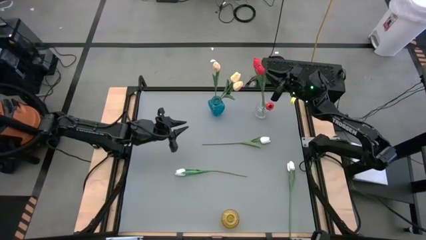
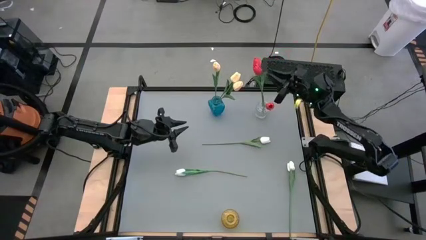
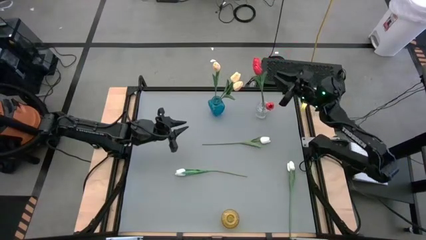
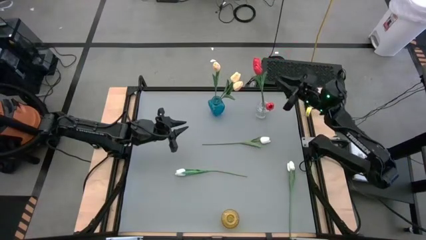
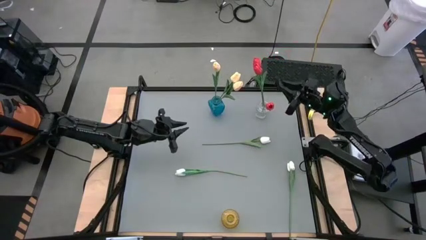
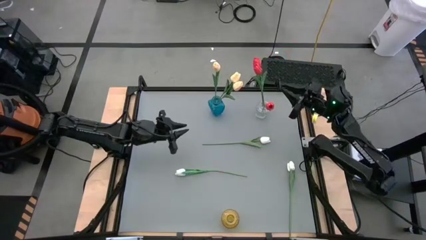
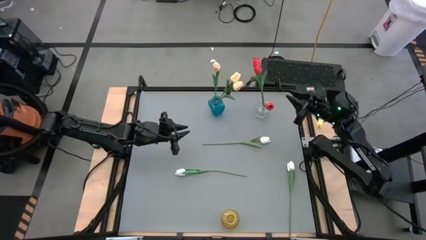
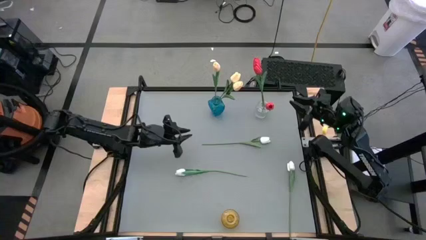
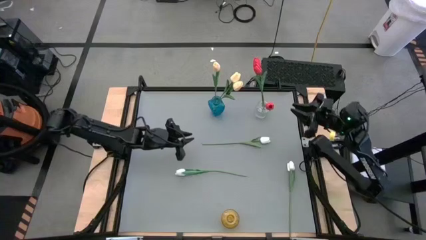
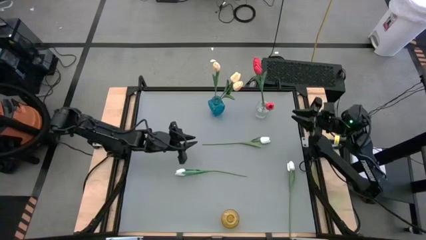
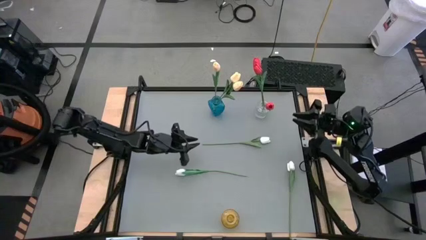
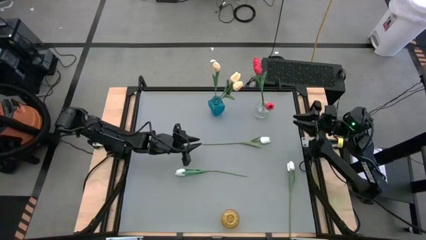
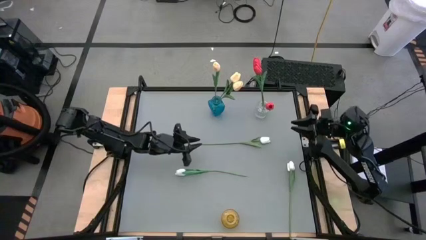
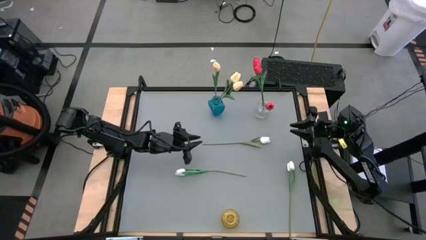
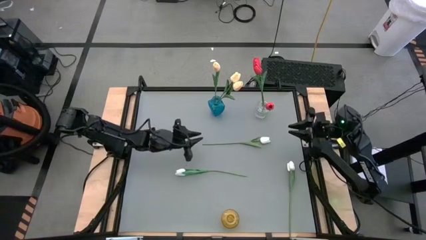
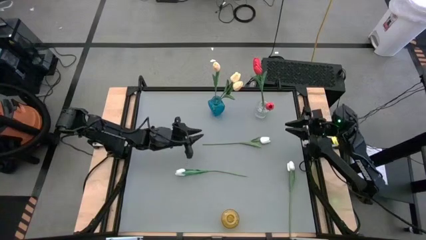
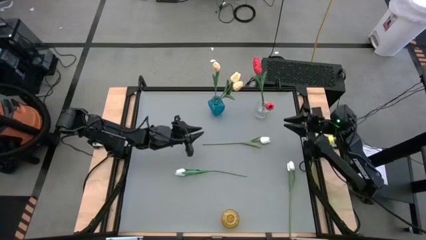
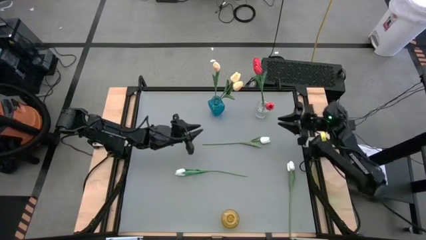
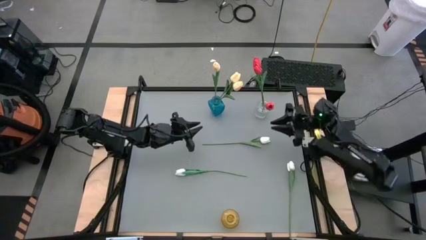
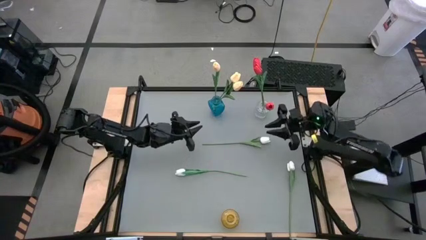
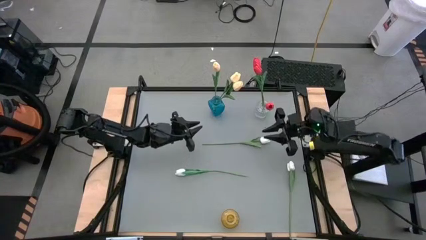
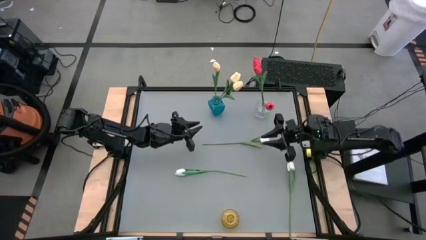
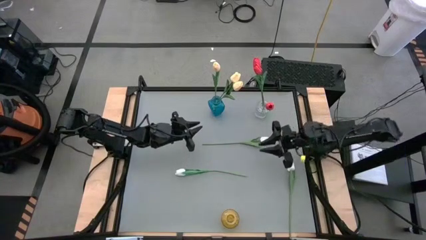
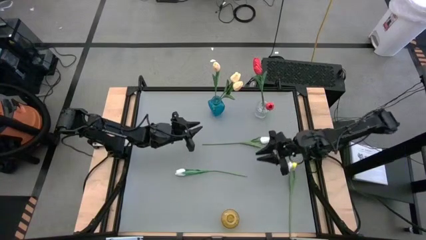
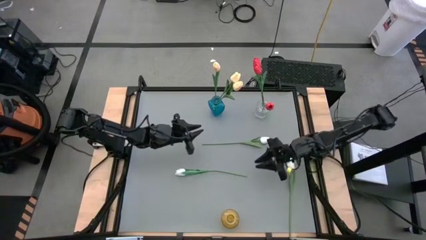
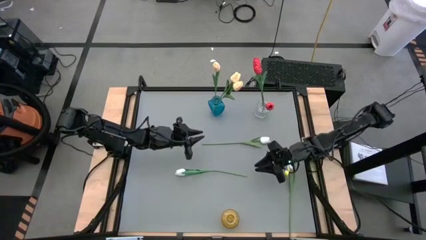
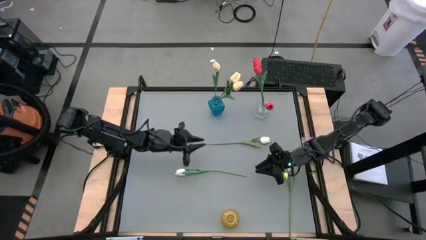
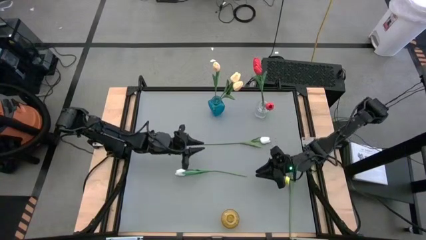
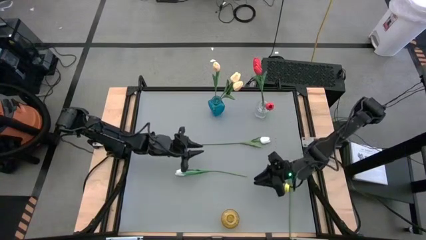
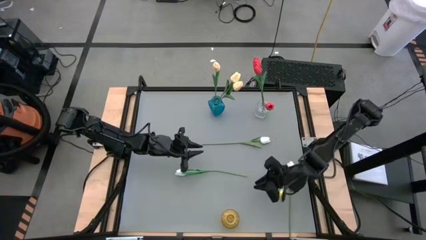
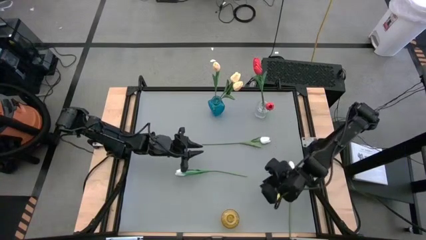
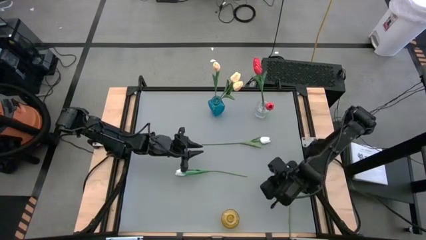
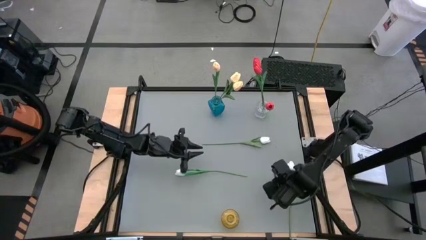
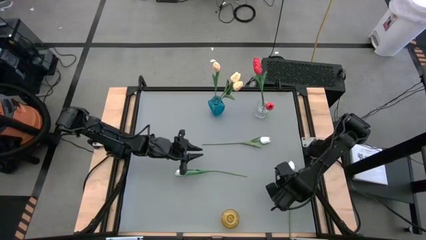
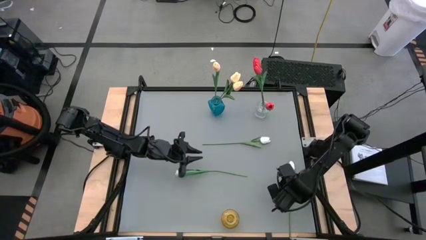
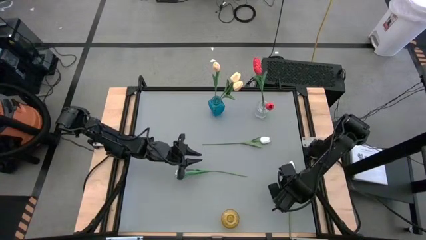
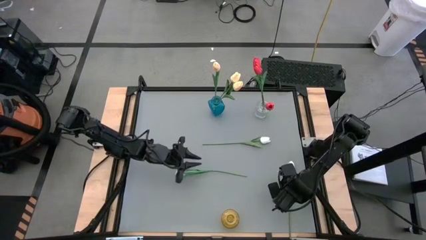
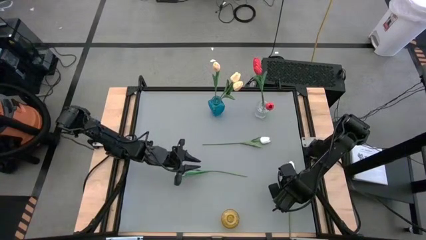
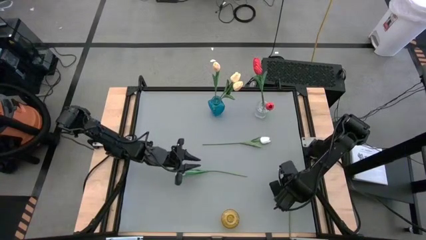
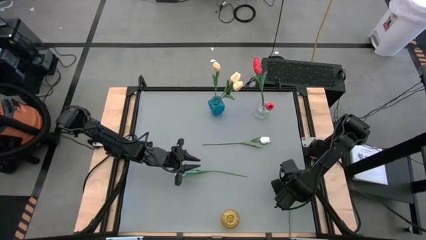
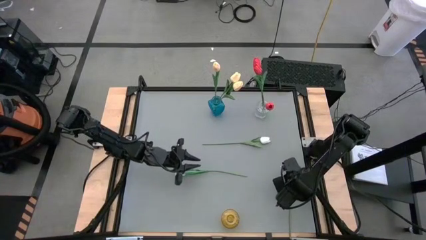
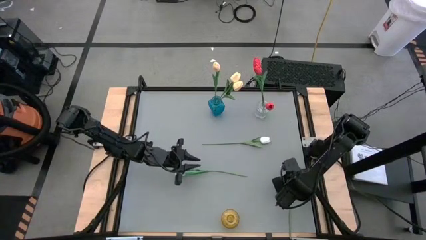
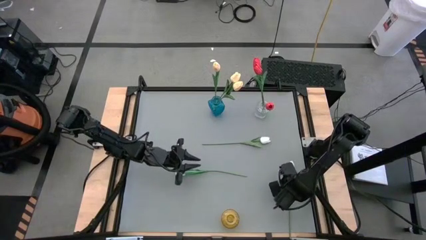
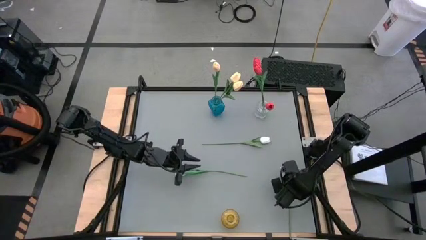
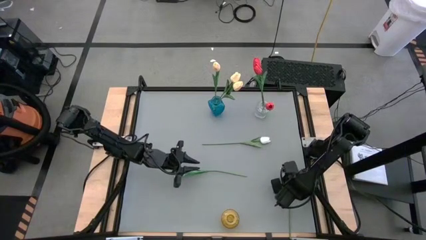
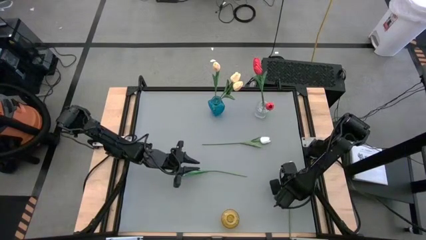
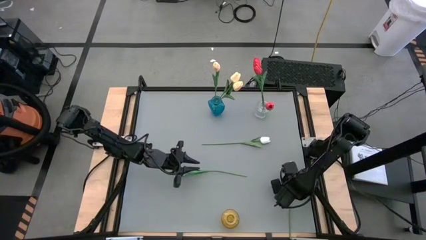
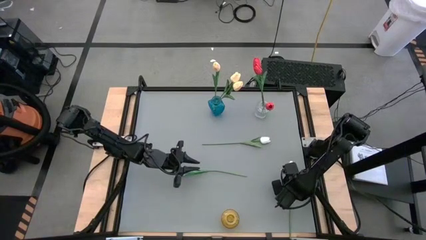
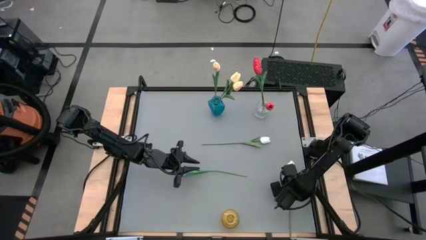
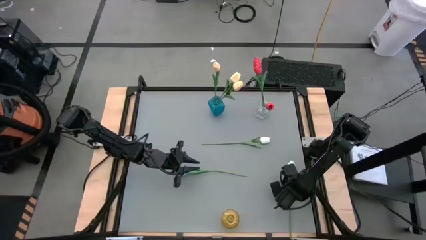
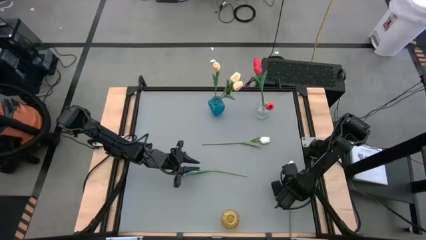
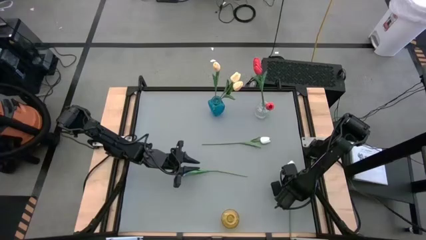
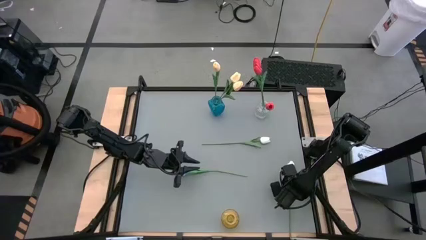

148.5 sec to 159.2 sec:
Task: Sort flowers into vase by color
Put the bottom right white flower into the yellow vase

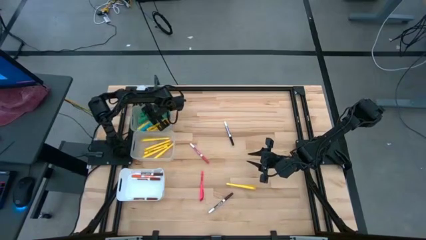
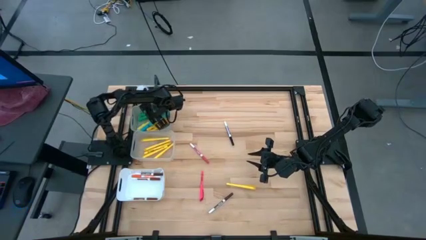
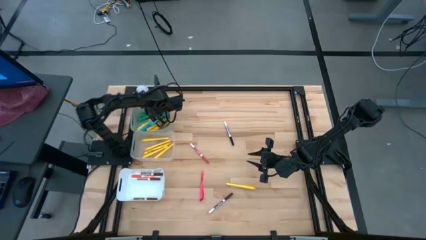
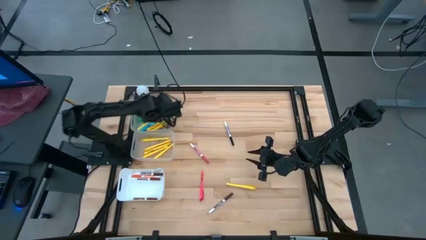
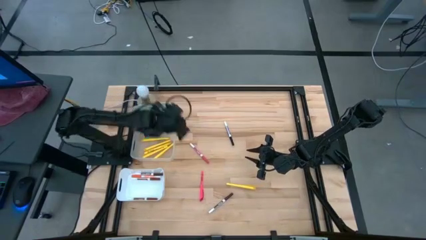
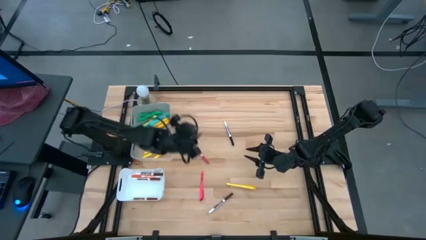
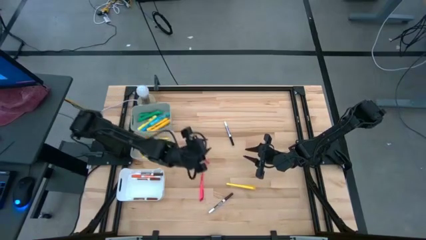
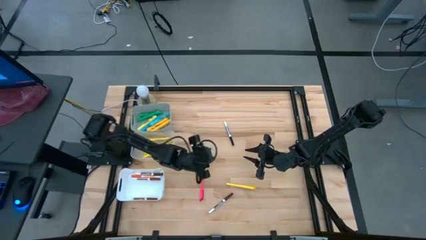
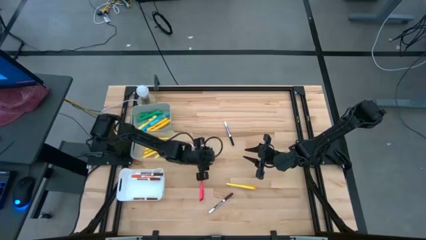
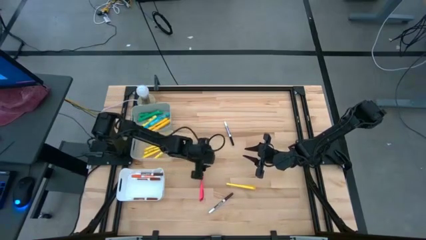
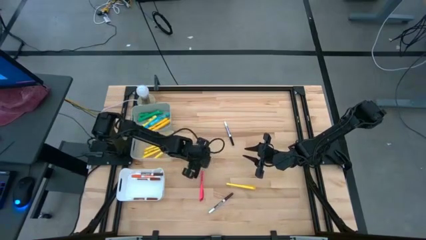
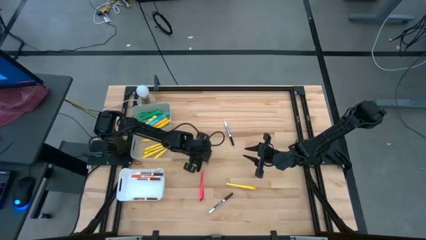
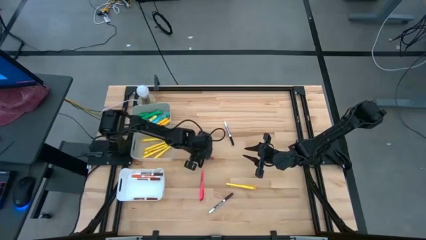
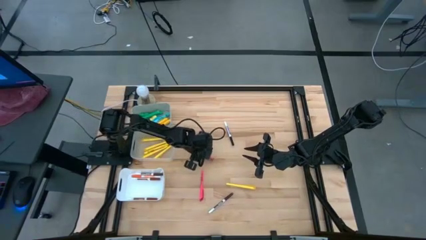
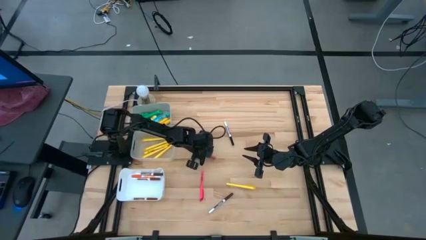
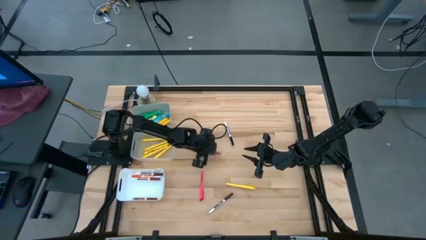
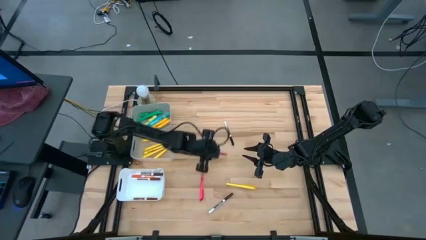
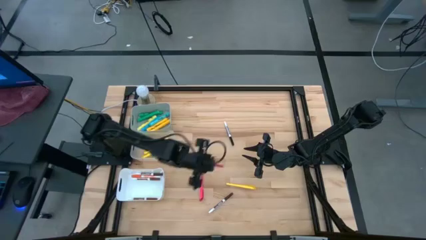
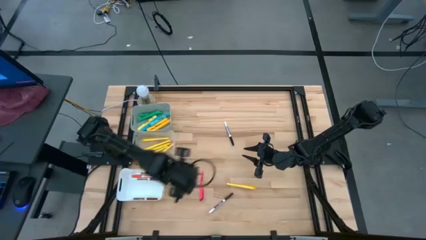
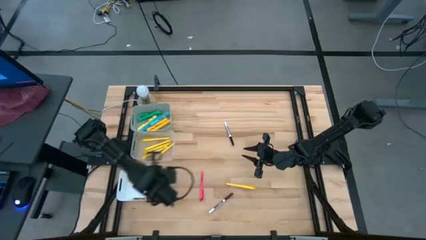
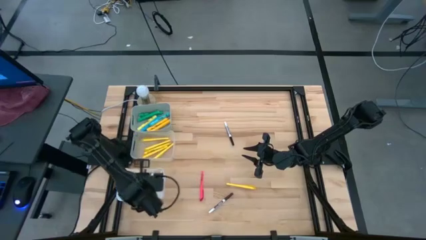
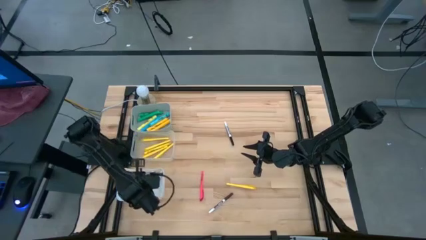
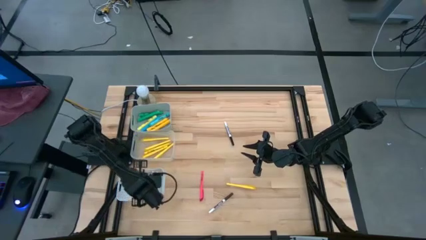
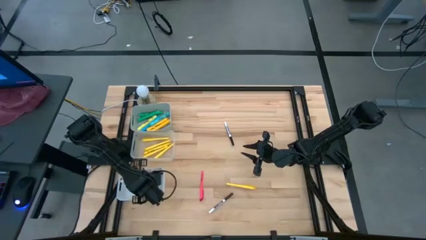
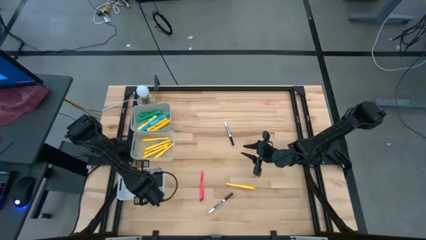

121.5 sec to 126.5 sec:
Task: Pick & Place Markers
Put the pink marker into the white bin
